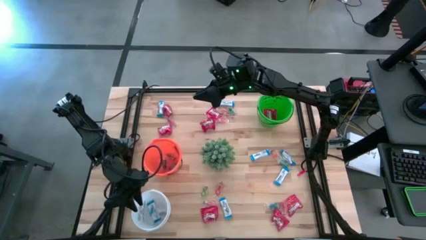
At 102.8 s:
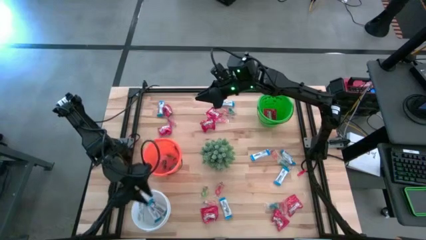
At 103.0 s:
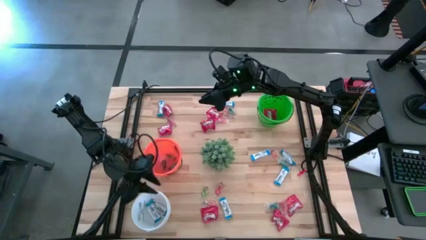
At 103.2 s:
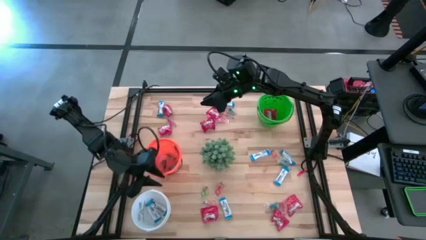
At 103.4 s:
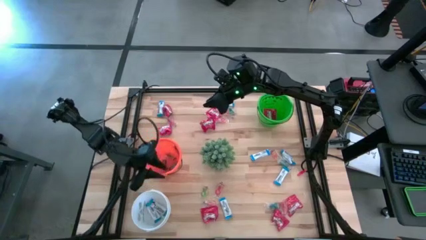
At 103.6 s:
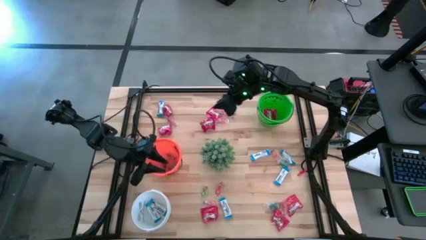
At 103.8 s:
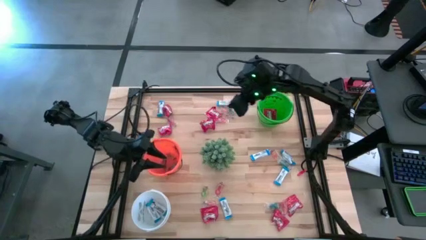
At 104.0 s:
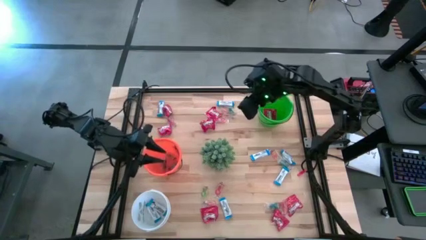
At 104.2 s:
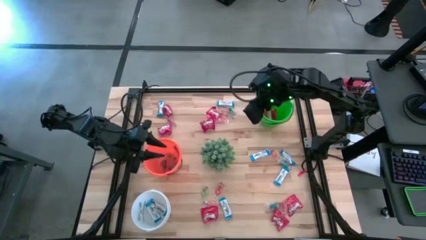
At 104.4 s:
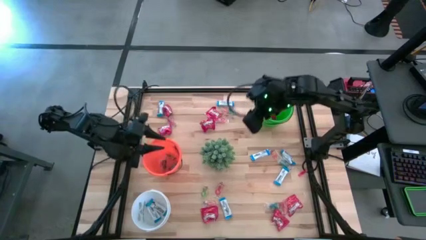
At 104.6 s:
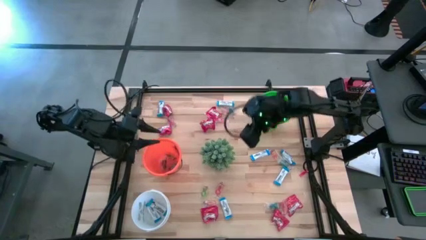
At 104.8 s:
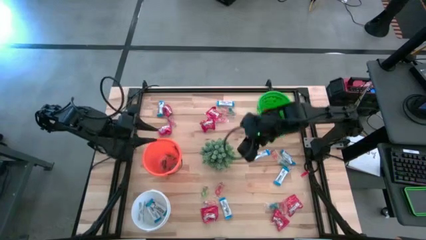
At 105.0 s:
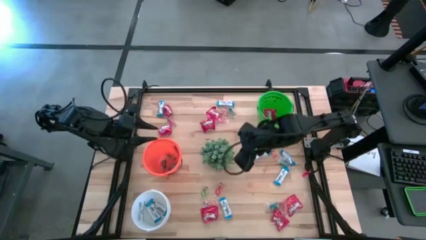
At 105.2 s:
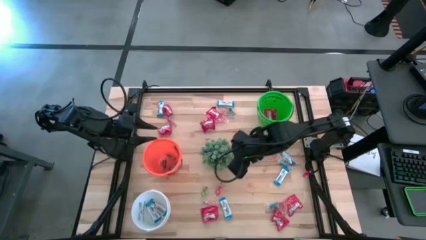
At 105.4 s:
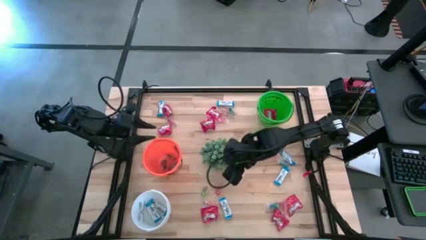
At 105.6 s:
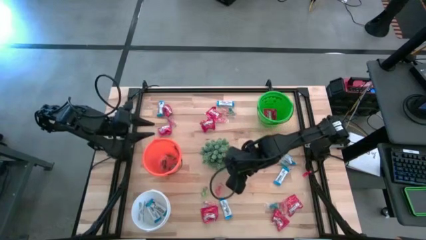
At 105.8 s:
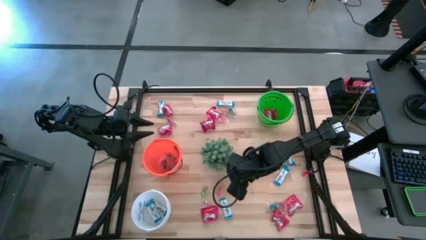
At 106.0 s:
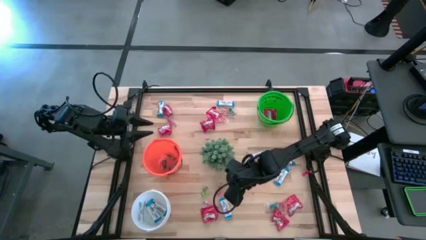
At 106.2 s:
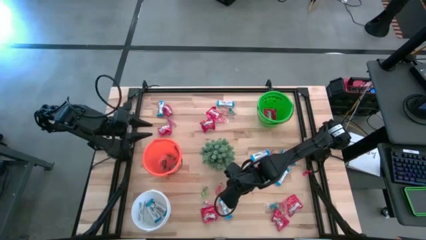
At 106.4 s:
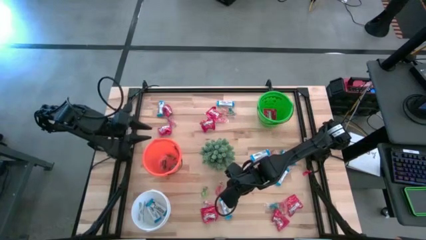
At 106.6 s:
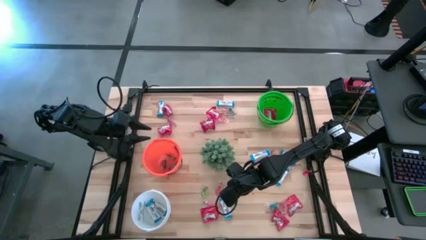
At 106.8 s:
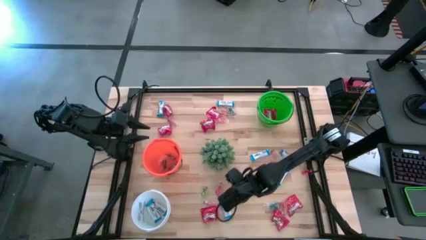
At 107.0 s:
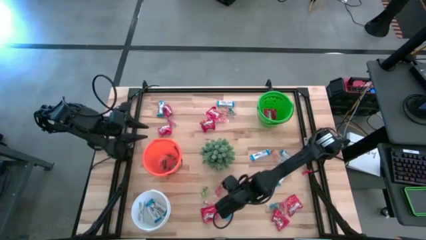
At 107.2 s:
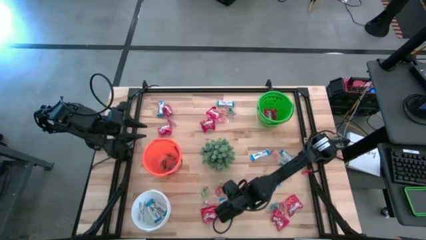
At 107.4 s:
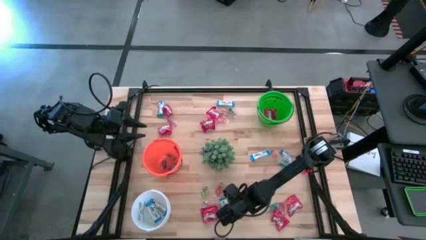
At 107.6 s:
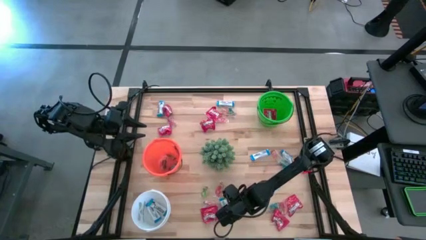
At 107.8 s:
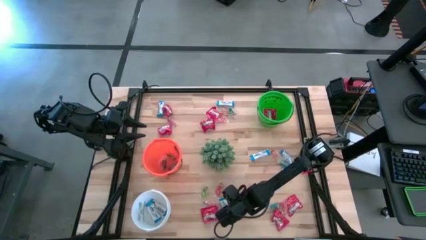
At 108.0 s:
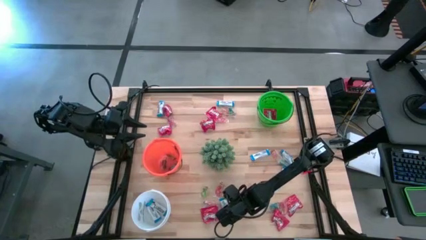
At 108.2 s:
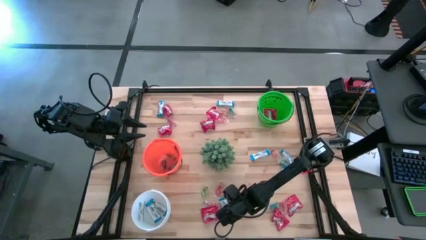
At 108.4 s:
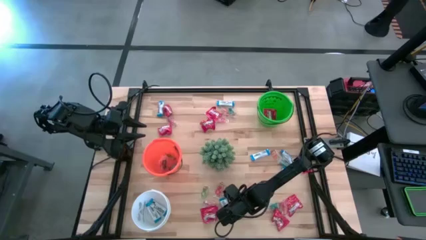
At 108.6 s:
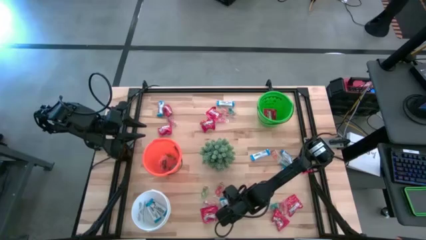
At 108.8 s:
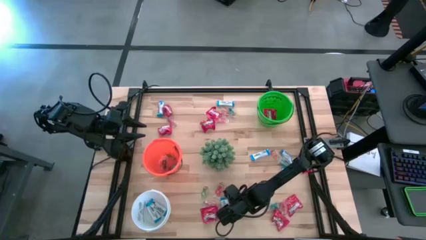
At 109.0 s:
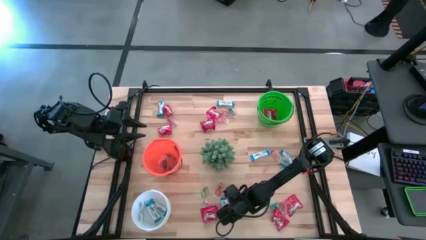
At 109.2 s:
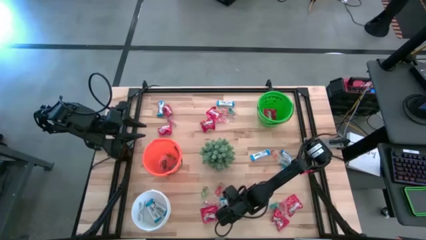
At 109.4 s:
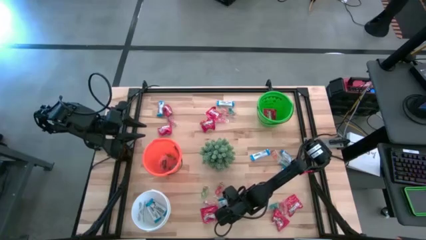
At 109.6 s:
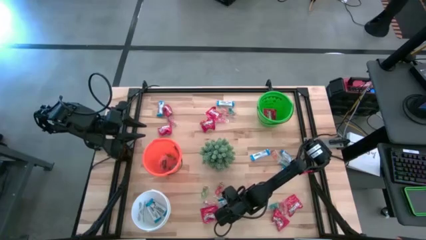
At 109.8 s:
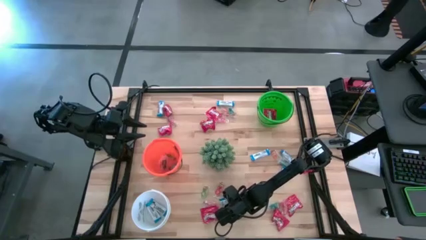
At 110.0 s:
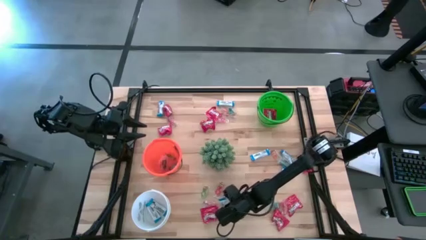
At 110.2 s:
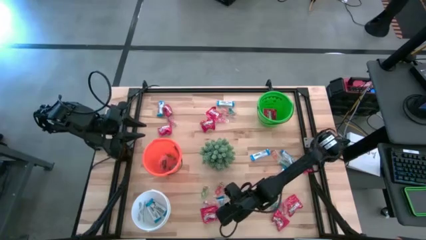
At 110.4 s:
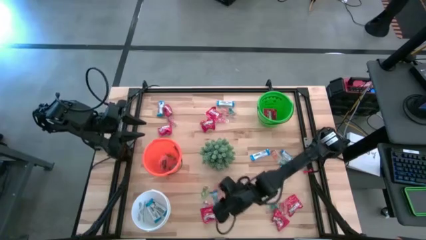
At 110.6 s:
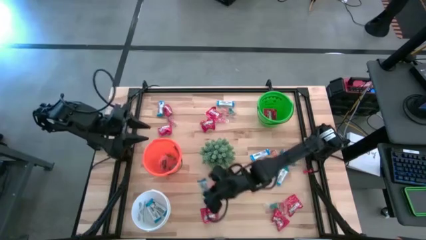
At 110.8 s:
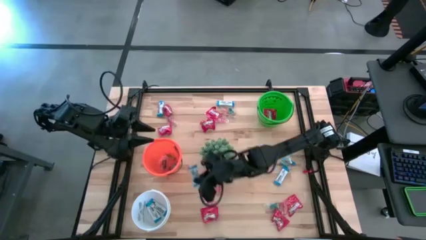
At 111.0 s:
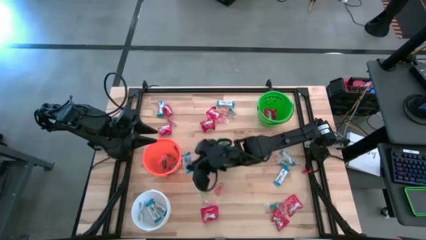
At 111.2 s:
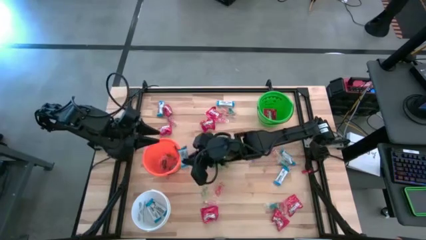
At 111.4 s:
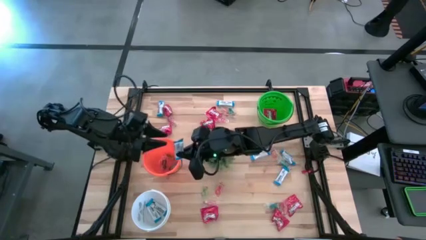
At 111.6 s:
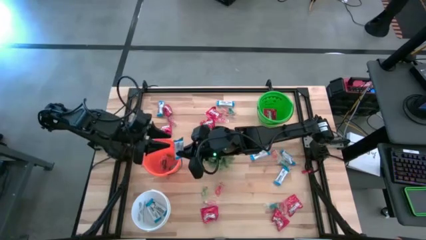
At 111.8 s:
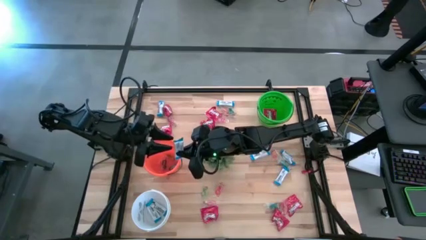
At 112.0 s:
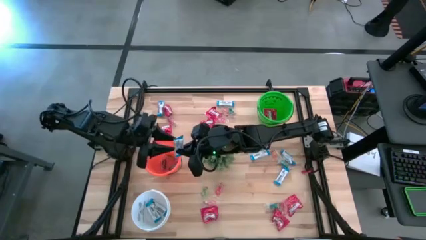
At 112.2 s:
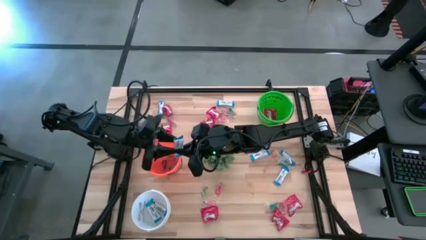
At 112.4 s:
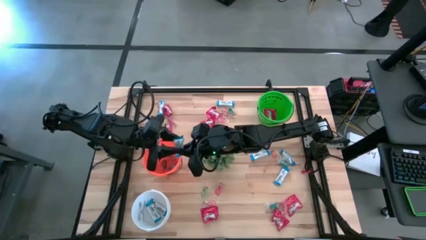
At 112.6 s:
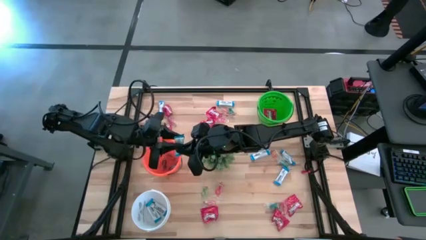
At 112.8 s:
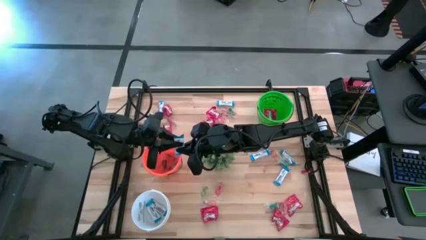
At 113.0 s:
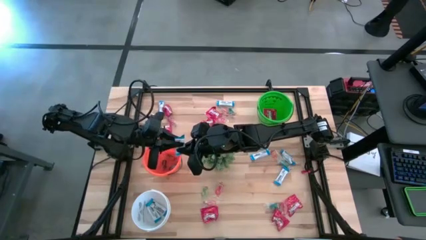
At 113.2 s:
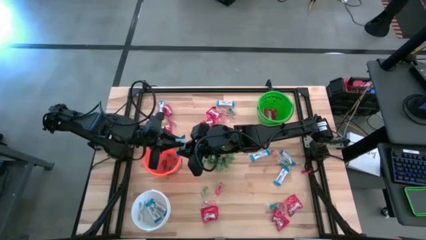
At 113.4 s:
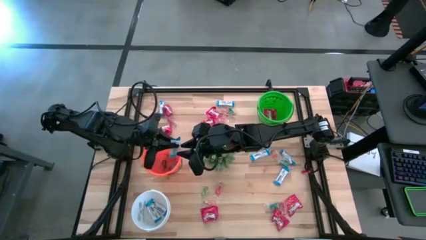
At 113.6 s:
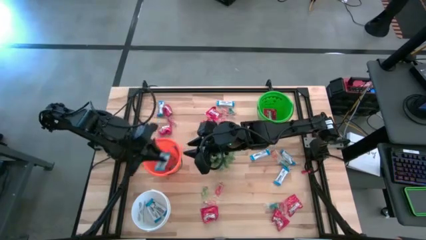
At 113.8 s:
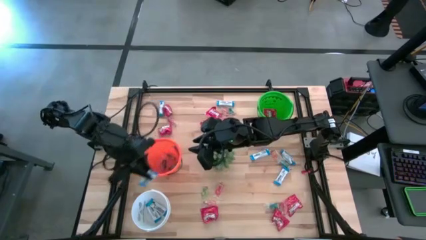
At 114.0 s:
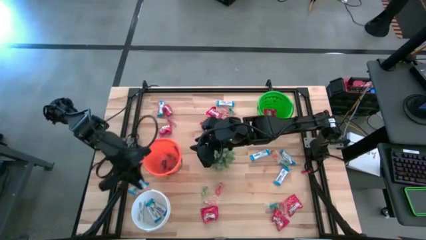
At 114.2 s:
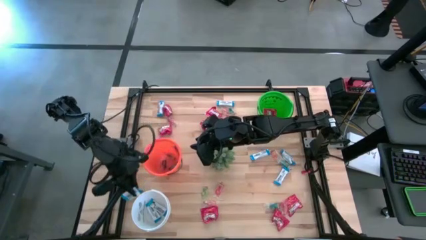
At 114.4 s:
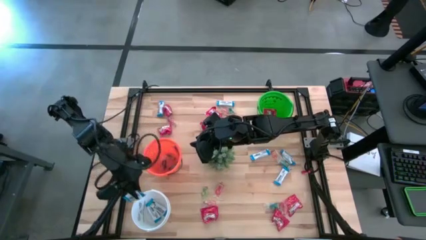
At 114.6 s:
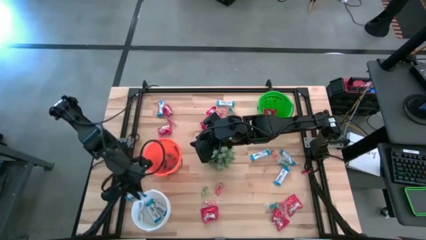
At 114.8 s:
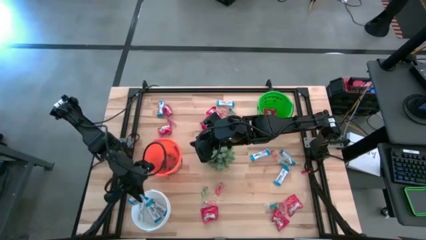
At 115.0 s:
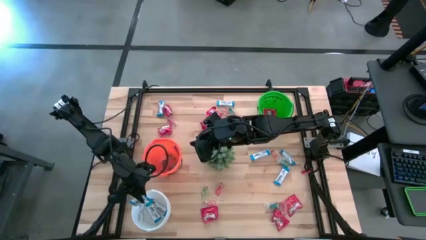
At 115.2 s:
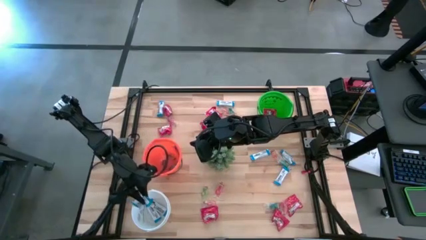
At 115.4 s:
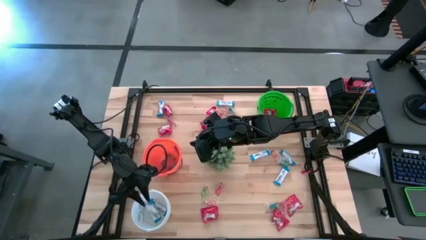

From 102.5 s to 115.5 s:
Task: Sort candy
Put the white chocolate into the white bucket

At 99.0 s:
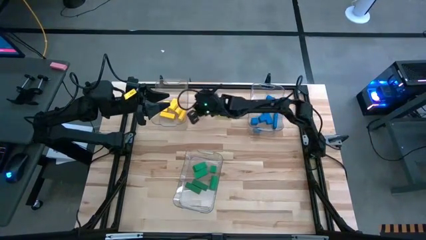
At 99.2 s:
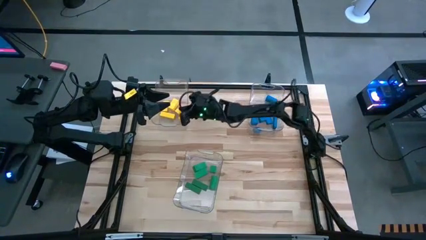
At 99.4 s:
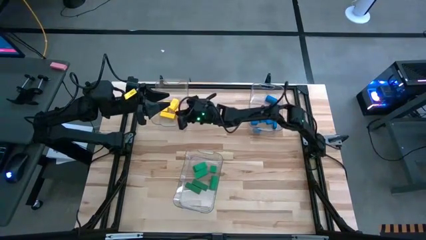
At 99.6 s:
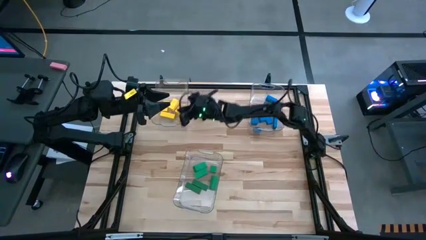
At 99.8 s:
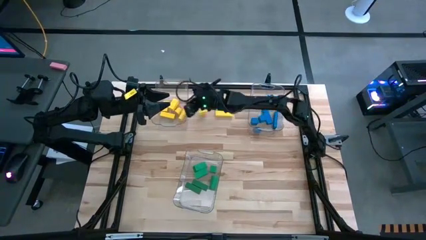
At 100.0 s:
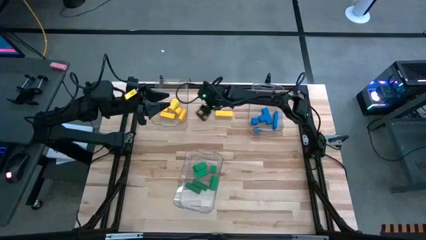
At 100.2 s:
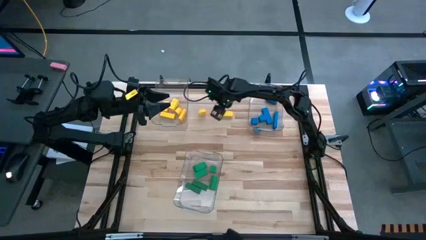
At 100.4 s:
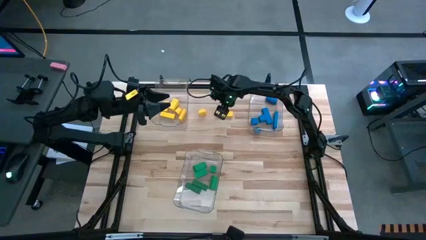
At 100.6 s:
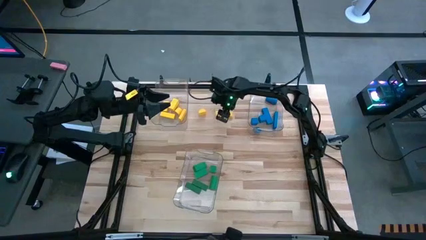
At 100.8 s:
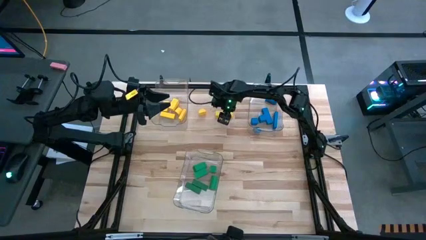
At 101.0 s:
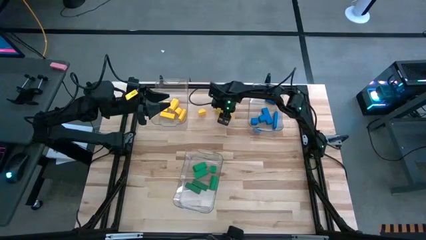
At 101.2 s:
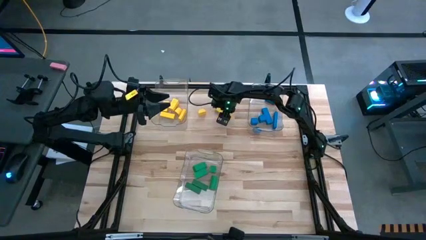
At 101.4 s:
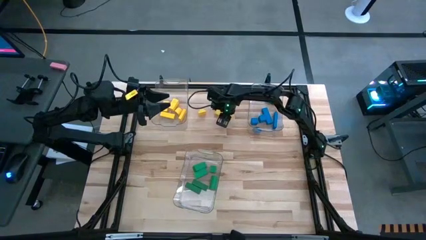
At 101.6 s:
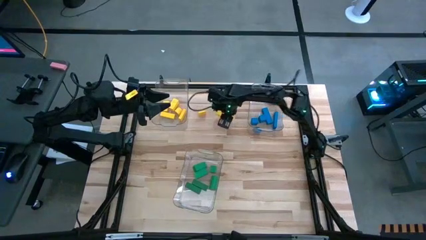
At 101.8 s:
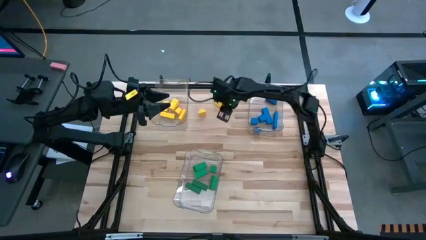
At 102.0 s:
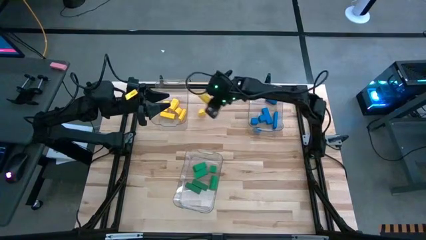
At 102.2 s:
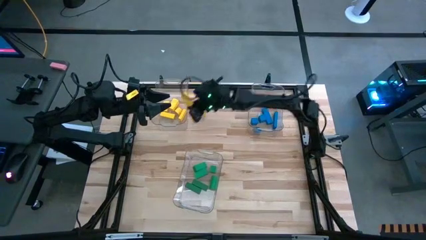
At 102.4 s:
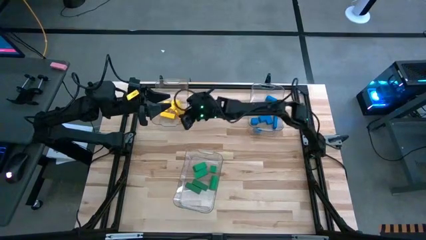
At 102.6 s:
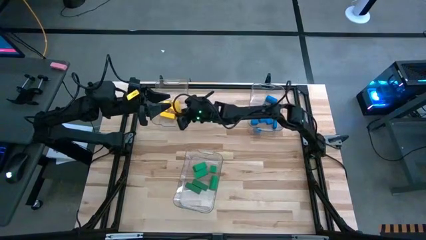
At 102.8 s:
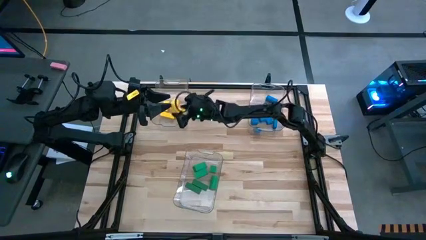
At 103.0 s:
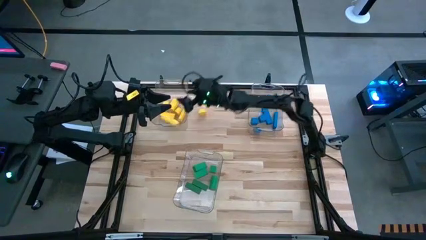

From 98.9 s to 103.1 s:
Task: Sort blocks
Put the yellow block into the top left transparent bin
